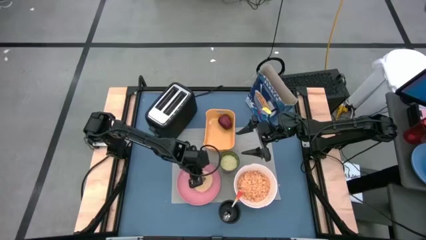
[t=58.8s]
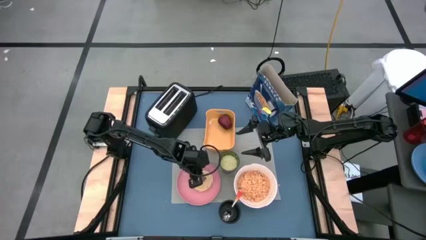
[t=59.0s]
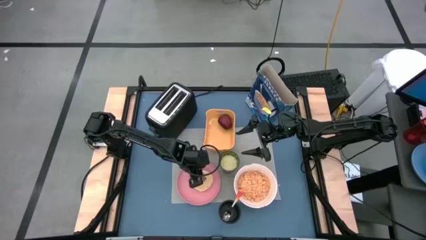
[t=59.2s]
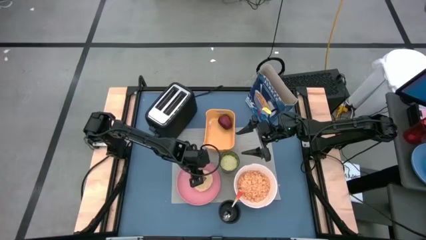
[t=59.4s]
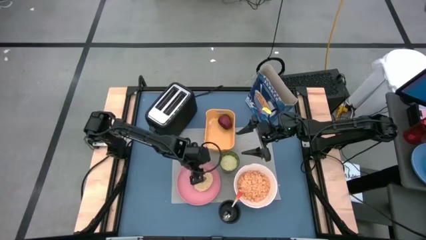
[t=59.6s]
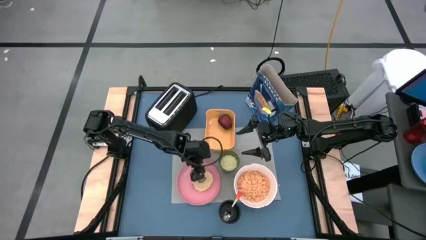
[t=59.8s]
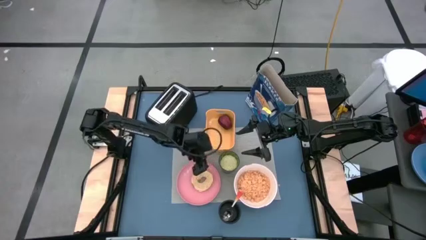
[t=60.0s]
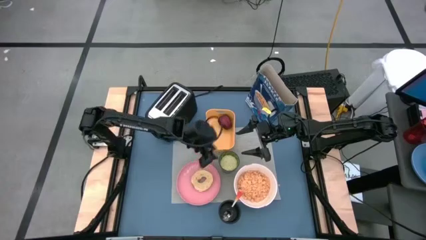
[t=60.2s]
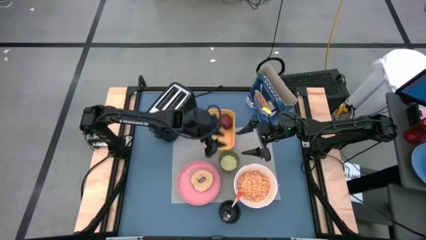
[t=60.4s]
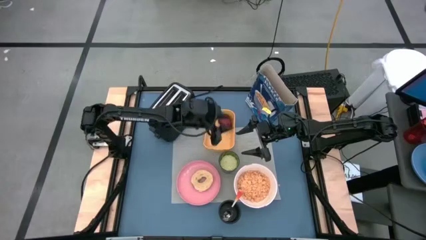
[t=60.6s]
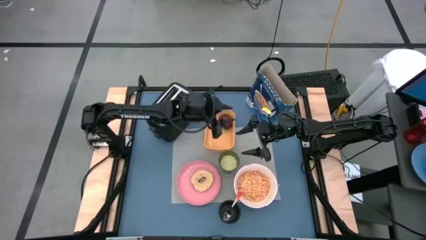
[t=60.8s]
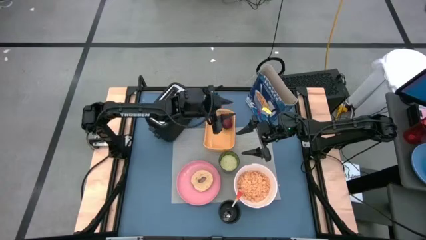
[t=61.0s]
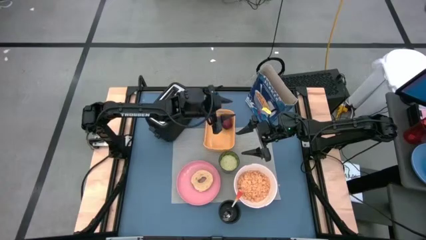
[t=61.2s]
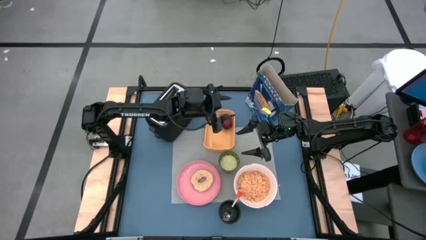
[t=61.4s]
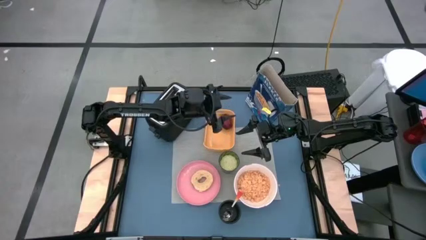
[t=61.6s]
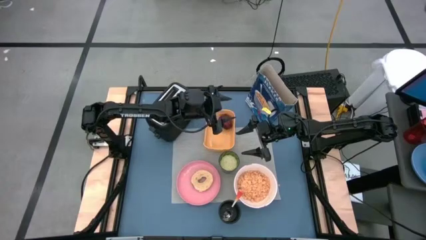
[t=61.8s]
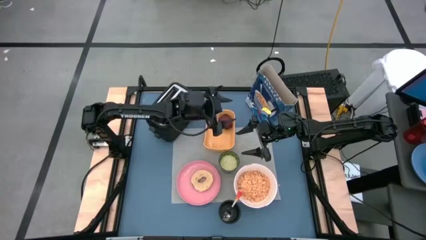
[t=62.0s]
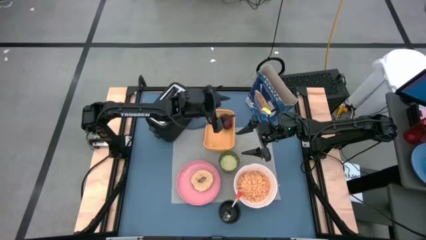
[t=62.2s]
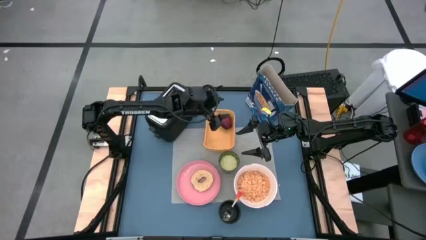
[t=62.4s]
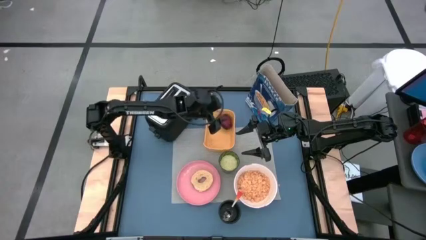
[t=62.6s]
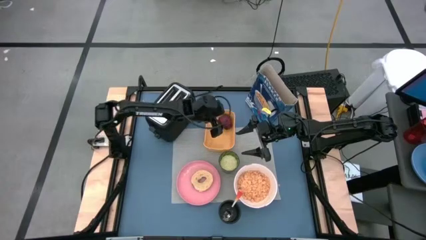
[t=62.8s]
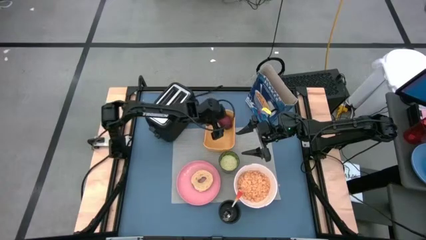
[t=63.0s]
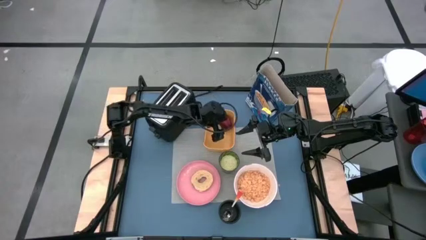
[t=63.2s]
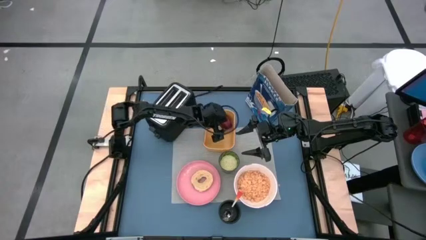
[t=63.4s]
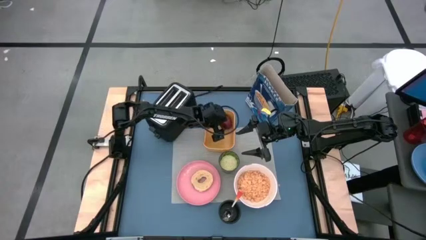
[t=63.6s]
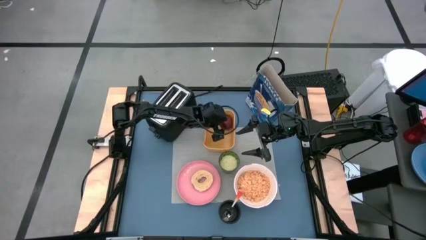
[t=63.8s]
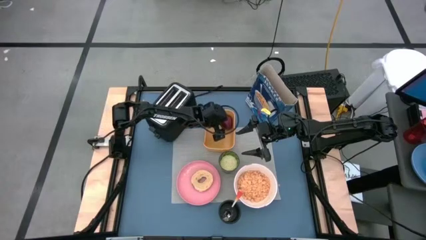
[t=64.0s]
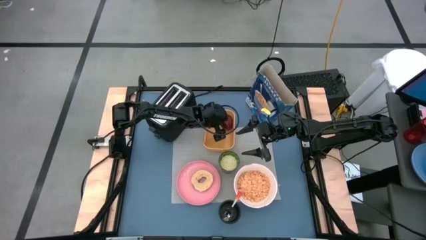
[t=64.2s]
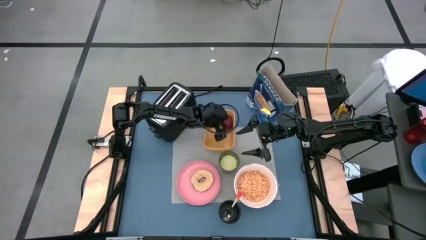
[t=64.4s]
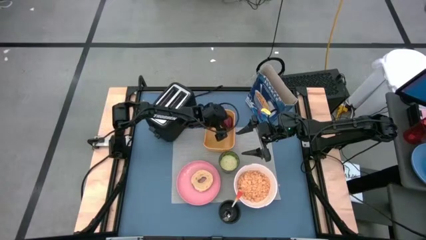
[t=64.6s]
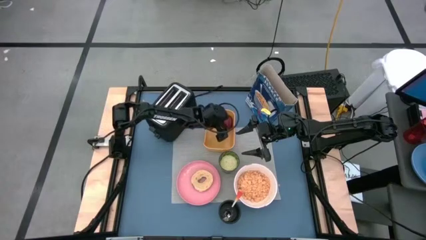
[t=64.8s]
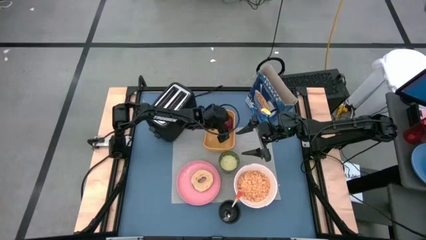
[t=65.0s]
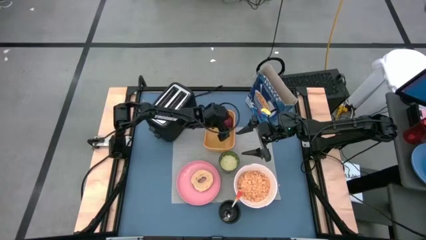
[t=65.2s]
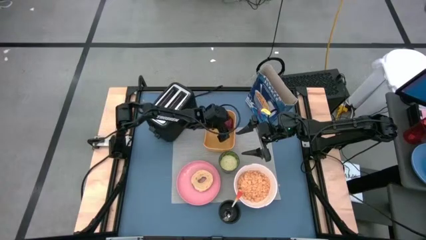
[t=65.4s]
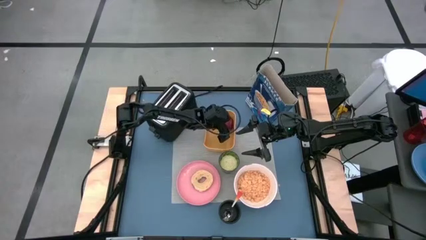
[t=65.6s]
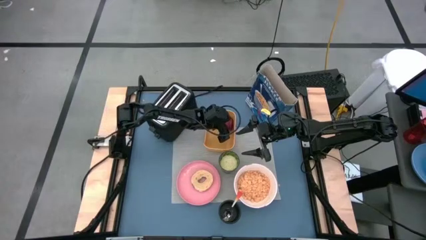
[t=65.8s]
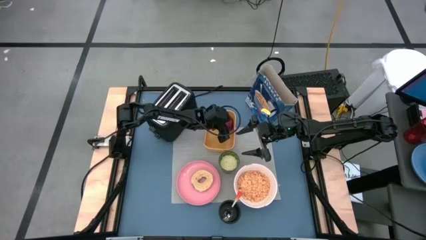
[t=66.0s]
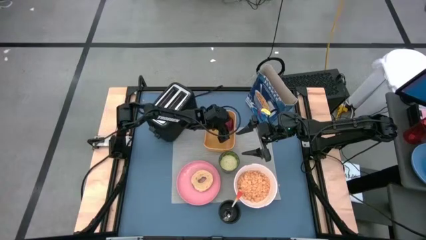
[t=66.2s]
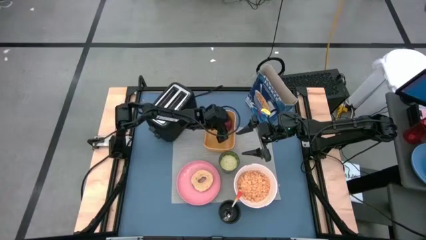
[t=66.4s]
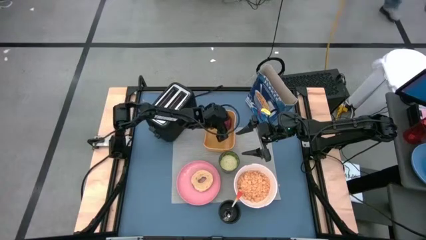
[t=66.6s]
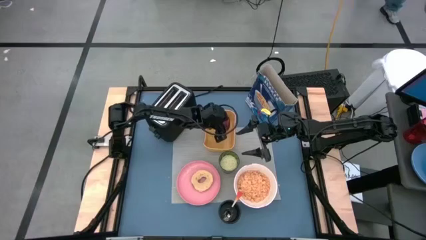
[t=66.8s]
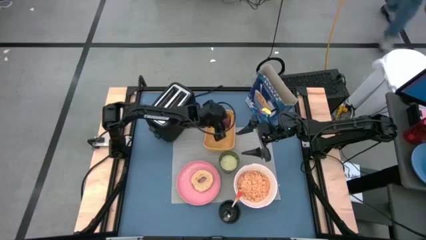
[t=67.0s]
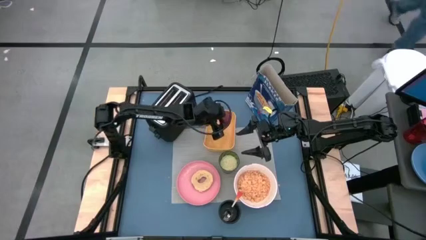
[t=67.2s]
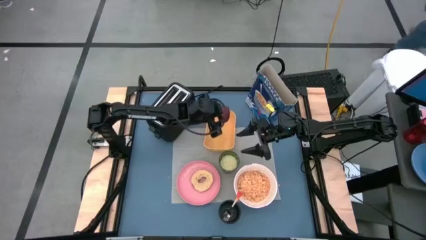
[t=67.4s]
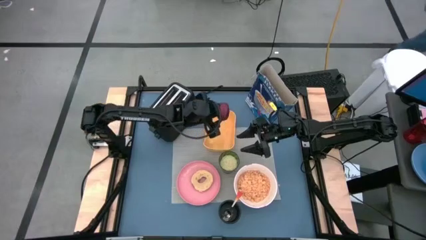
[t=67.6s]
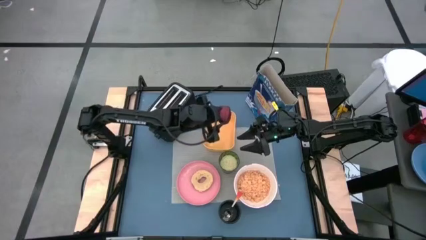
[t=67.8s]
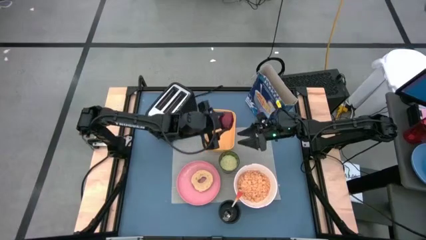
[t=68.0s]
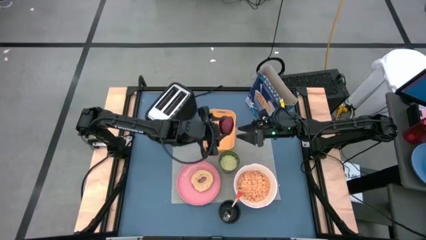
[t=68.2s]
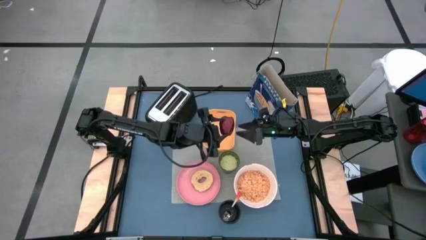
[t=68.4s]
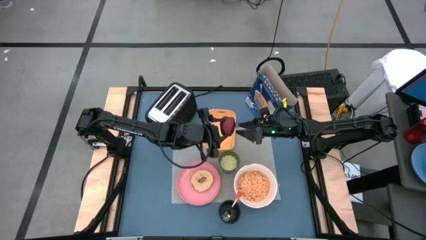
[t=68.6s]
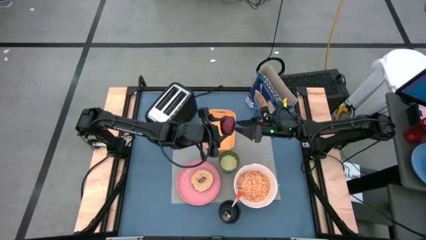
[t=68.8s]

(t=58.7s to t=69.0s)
Task: Arrange a breakfast setting
Put the apple on the top of the pink plate
